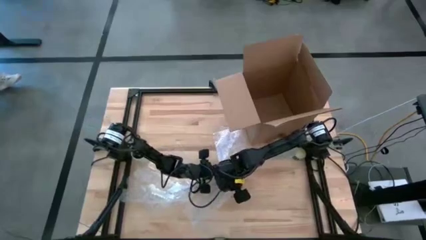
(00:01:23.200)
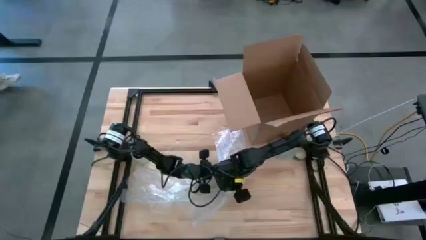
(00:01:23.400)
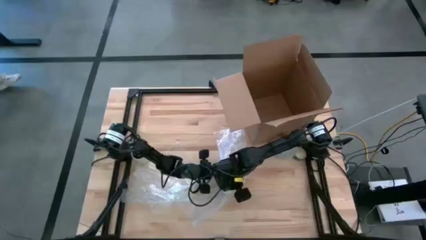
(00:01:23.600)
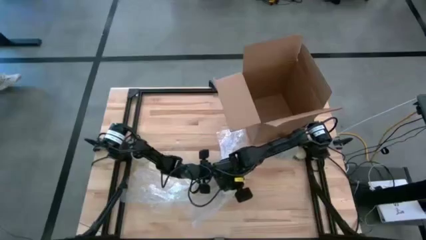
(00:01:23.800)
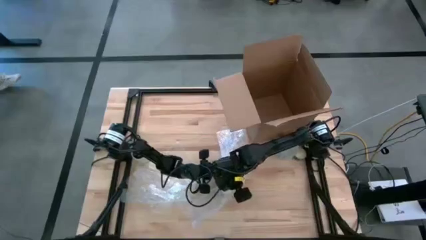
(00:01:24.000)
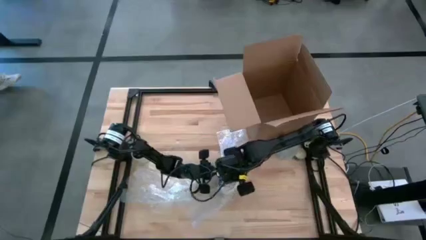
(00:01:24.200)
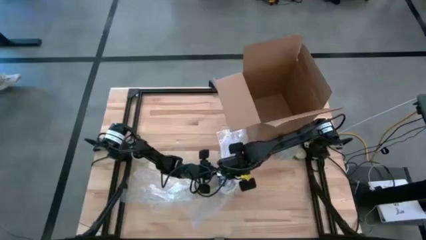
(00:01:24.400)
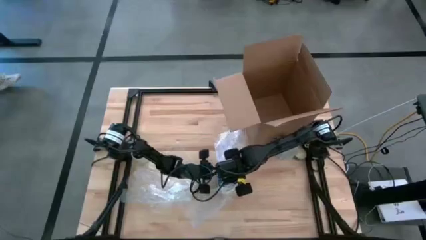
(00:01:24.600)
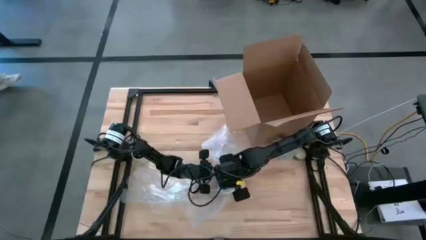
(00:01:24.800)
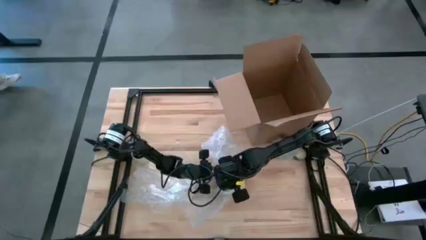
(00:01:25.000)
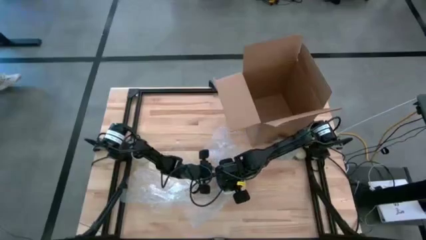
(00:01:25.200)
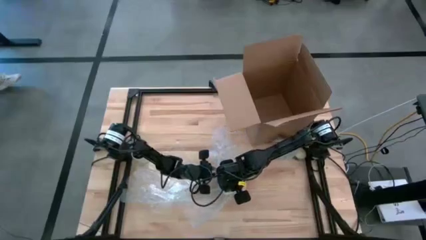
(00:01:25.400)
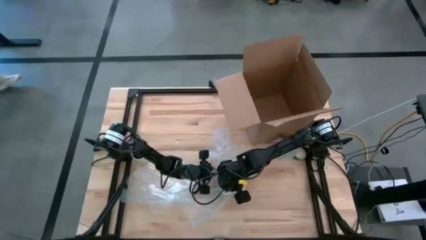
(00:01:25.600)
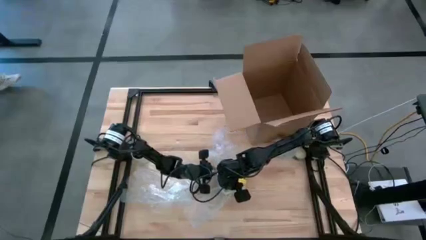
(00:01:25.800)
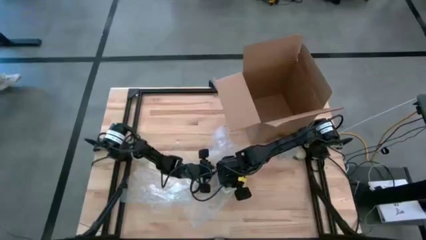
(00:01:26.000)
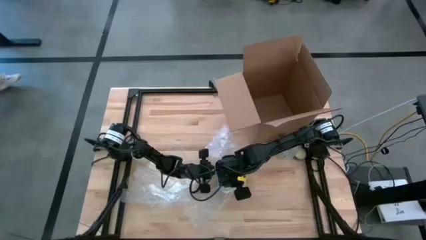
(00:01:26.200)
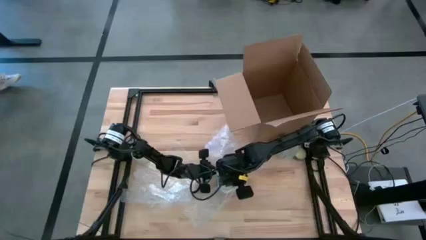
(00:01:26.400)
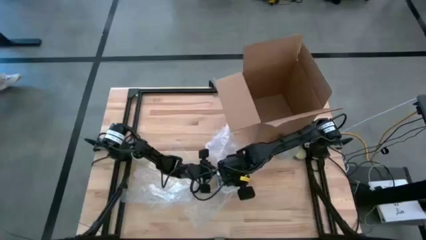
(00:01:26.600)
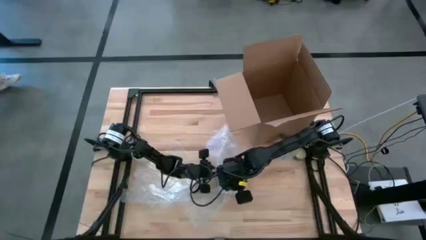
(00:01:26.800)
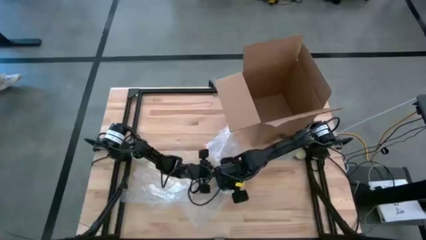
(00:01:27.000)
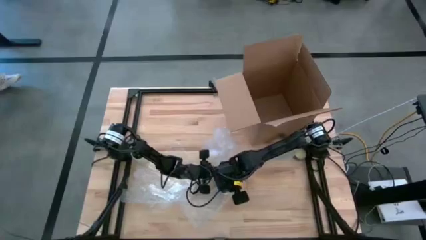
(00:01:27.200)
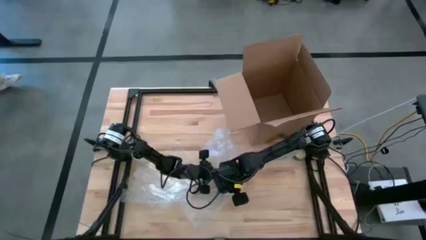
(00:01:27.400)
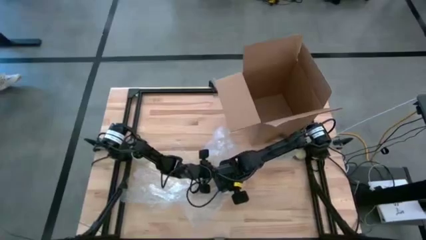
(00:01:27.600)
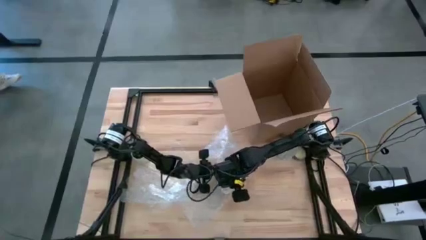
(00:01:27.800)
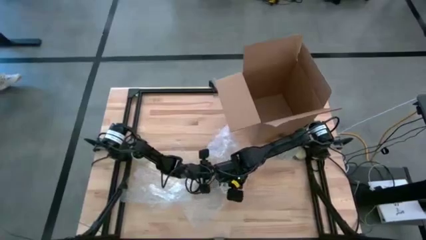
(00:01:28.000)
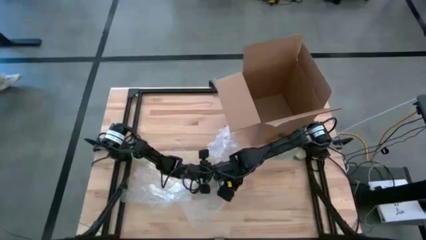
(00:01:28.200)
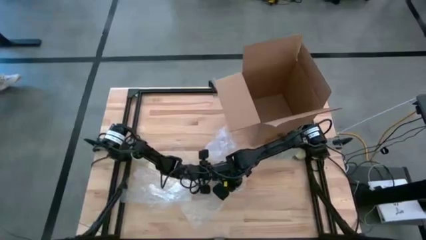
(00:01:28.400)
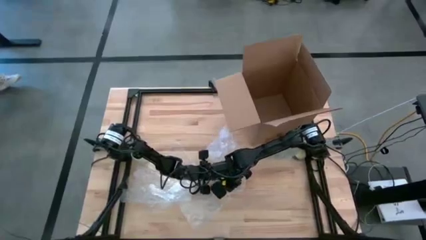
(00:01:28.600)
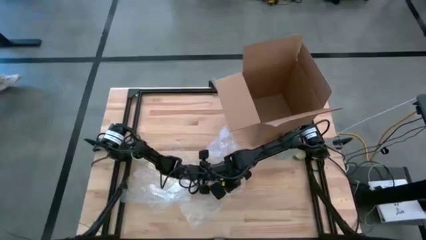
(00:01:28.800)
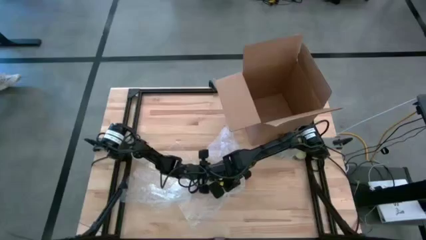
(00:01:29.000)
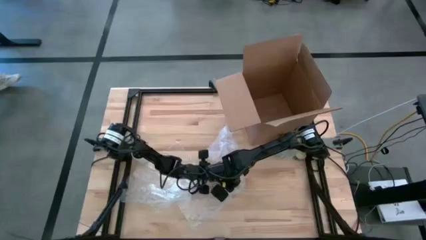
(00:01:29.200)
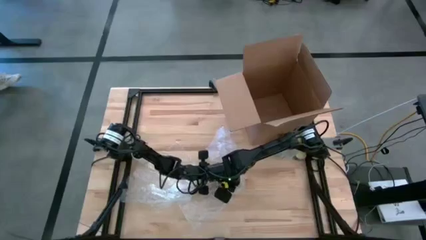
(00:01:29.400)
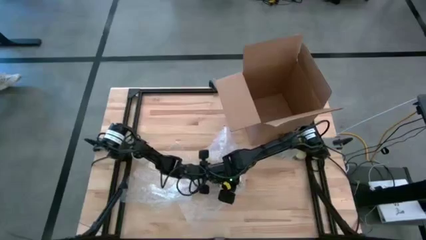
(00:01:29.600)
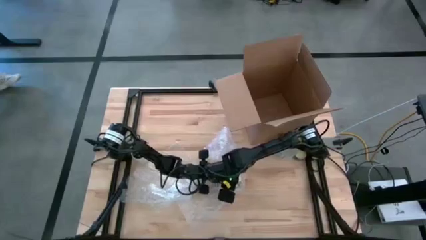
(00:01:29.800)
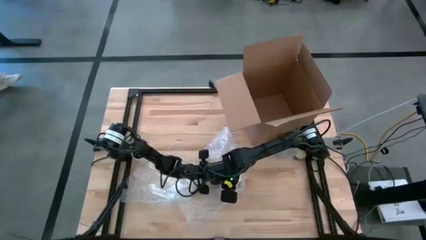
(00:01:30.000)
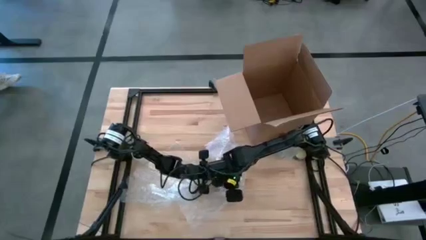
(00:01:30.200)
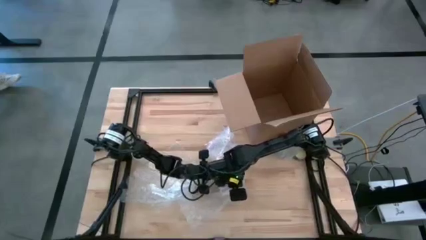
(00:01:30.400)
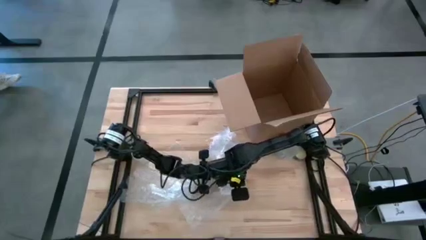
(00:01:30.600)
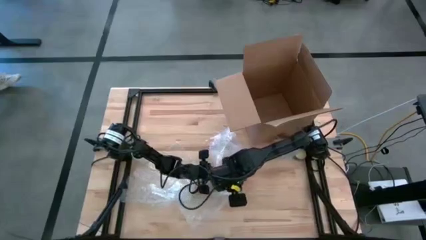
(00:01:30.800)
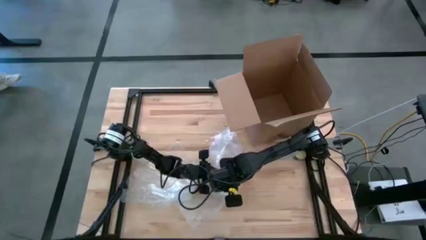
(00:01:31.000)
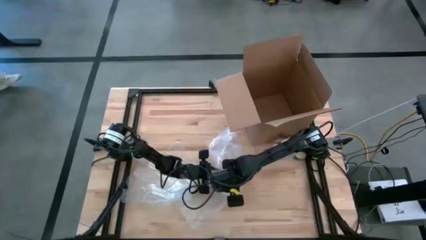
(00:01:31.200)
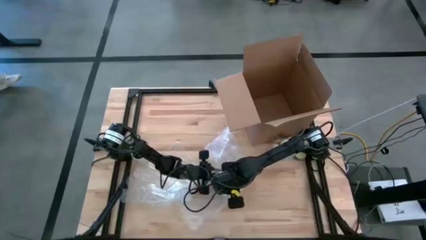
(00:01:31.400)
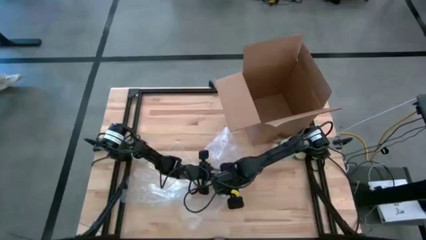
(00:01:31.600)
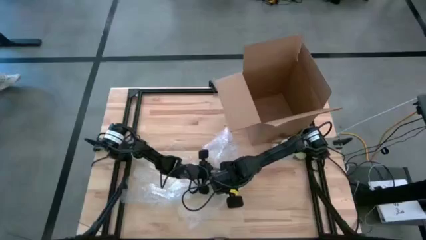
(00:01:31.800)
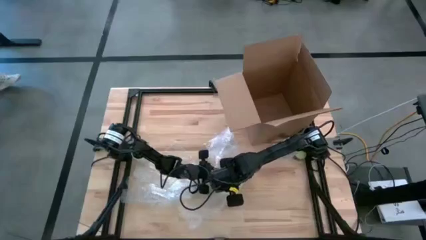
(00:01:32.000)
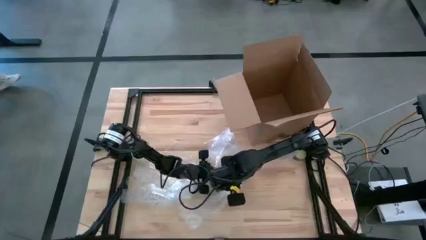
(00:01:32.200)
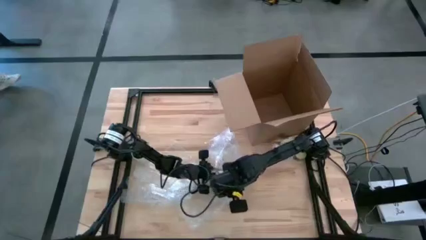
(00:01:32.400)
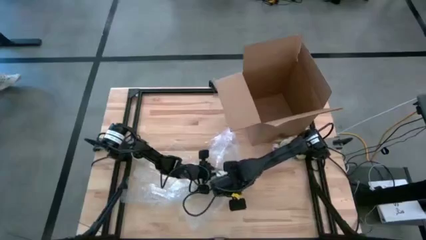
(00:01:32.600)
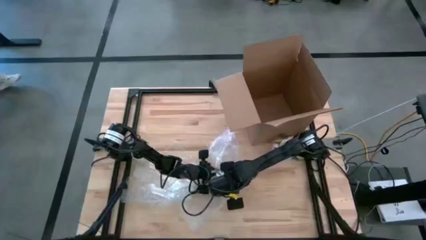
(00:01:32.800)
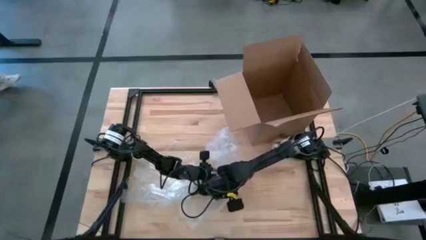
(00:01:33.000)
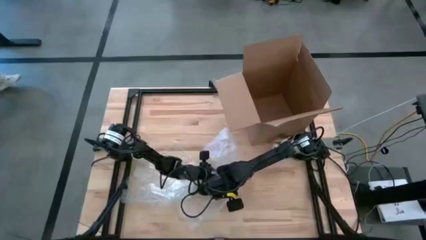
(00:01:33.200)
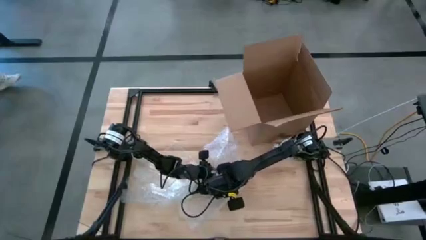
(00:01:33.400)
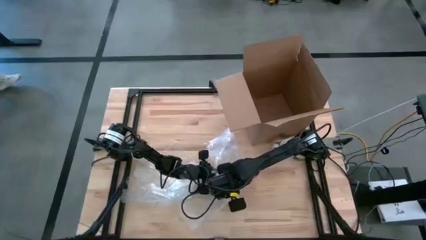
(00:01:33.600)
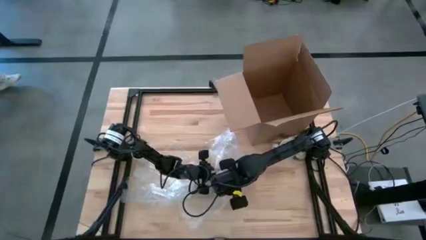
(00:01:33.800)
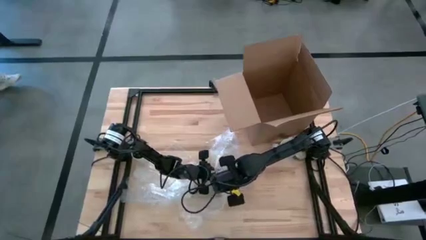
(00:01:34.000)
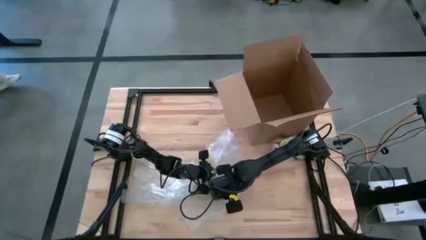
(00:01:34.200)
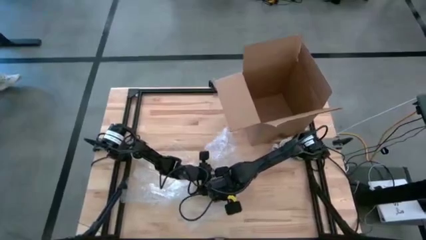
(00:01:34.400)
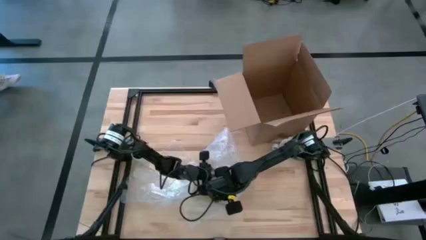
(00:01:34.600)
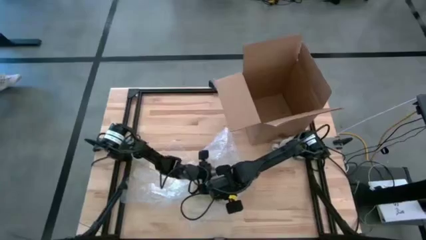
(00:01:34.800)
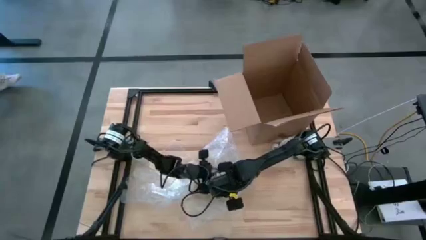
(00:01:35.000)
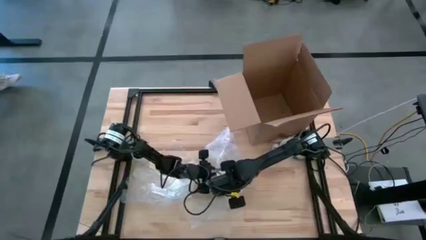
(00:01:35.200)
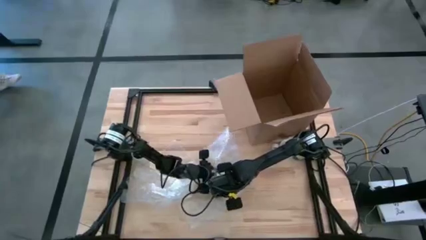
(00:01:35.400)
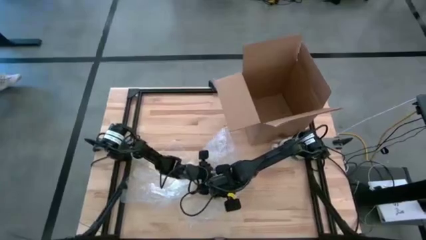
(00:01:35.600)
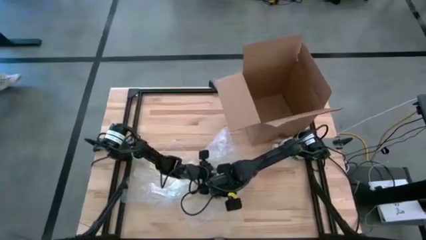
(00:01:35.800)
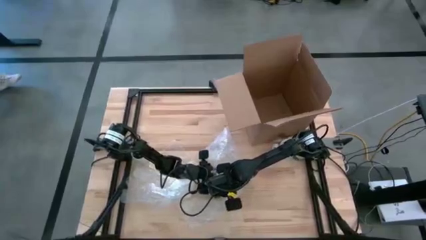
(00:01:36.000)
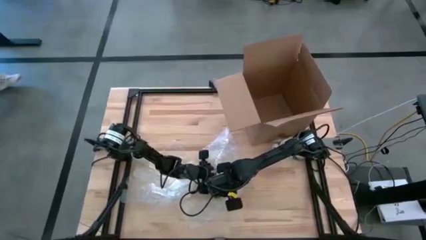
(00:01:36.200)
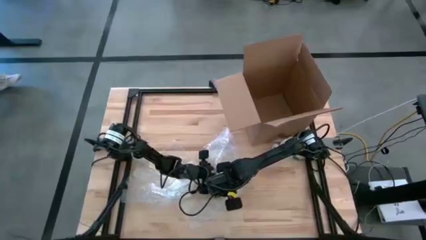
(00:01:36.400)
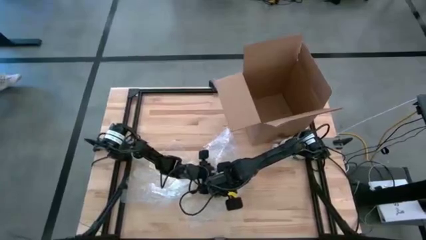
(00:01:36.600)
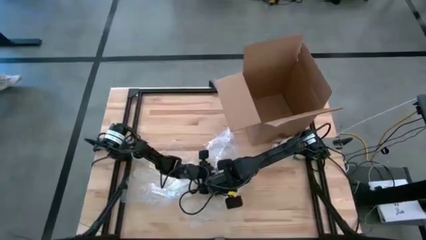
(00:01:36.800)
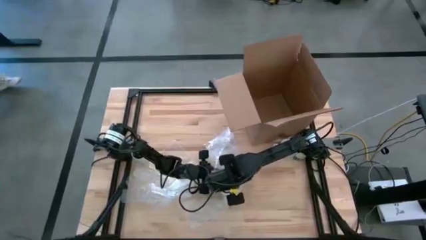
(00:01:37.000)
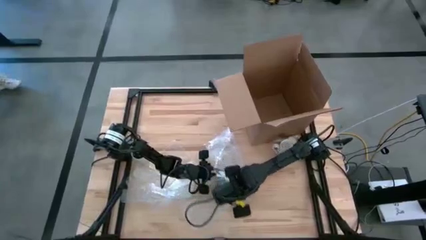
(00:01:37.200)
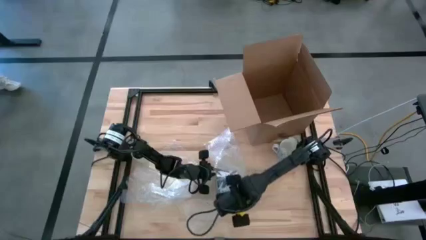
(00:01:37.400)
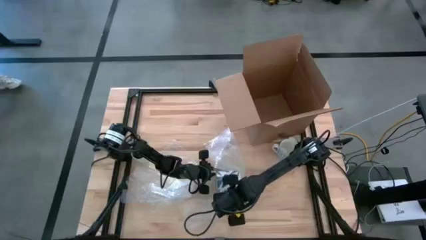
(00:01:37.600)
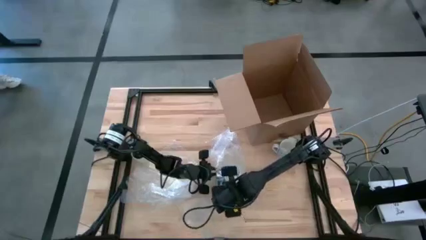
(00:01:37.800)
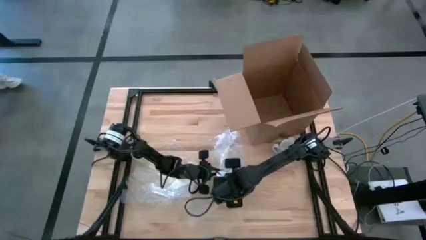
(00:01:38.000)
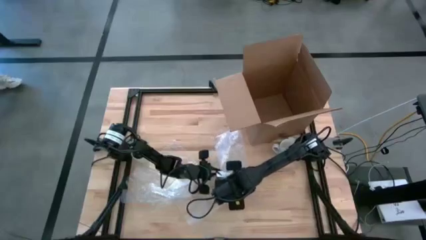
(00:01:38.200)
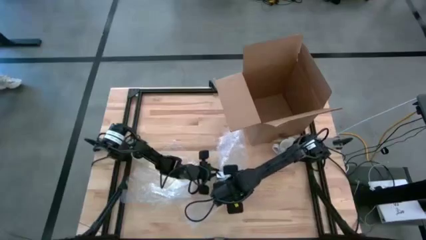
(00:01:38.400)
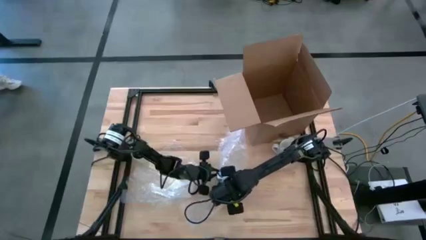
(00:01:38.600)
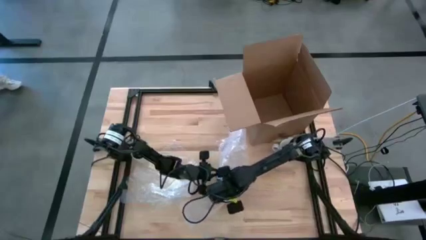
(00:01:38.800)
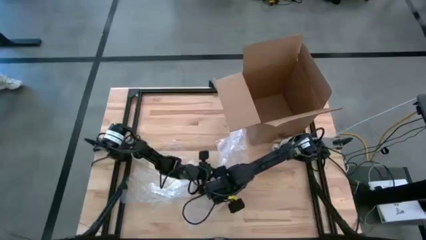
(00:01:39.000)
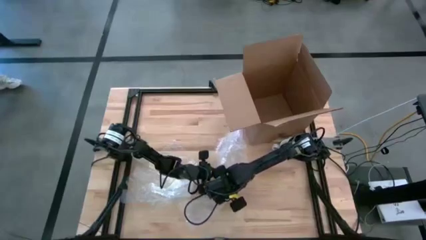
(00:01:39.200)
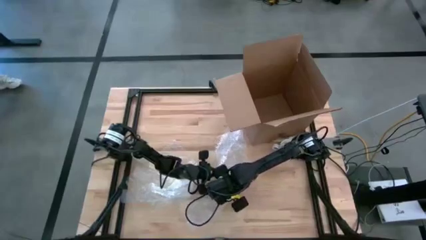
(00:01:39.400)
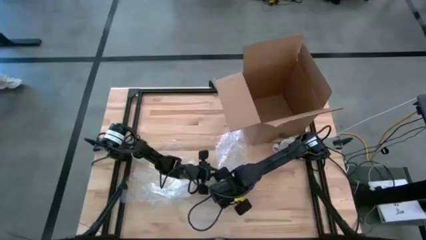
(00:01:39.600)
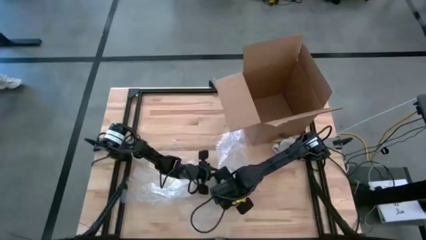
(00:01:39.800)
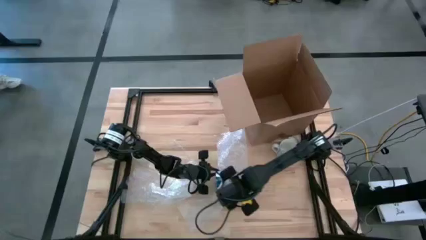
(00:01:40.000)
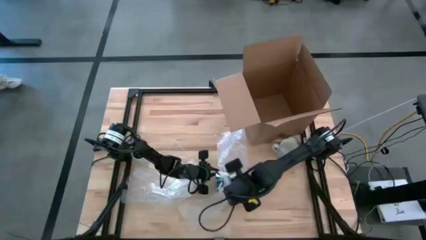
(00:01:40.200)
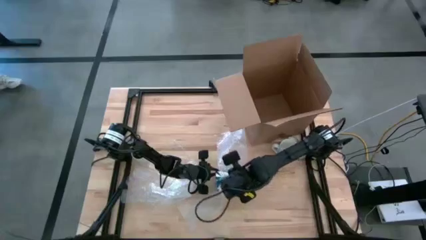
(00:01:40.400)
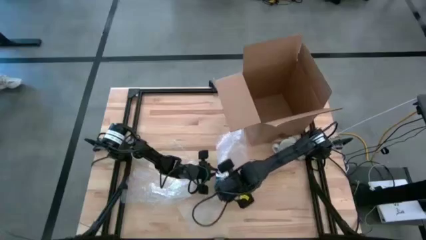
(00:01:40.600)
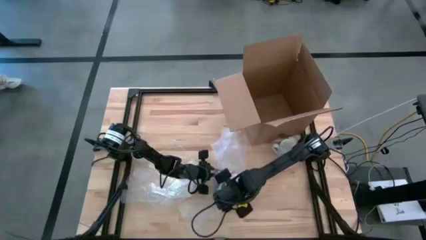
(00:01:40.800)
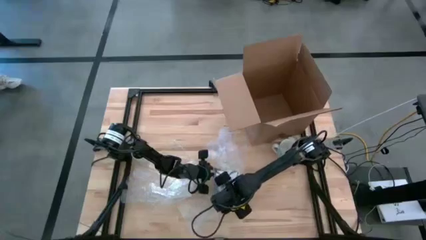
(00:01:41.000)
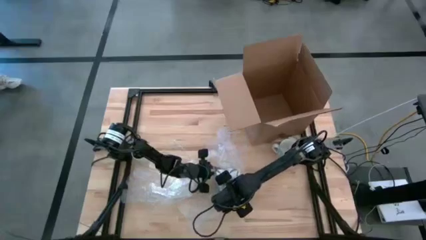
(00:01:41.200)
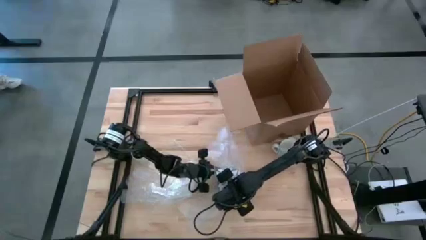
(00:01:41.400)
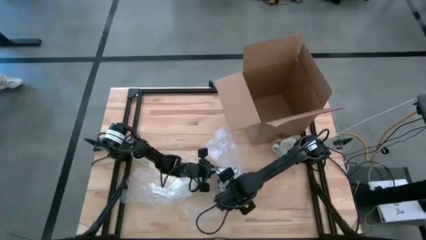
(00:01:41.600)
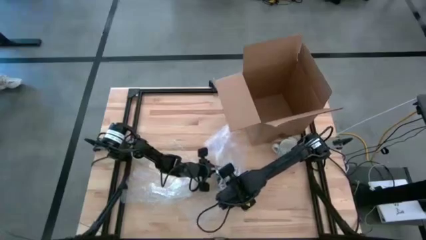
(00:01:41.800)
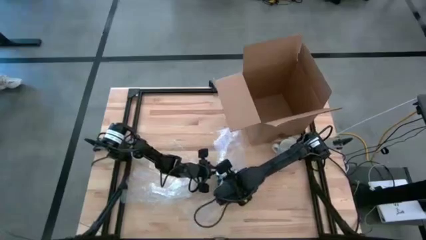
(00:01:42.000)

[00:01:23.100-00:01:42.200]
Task: wrap mug
Wrap the blue mug with the right bubble wrap
